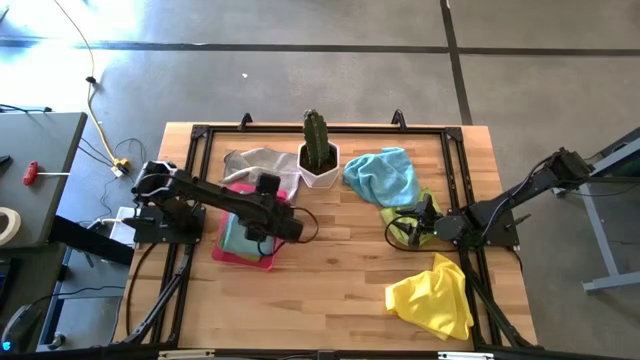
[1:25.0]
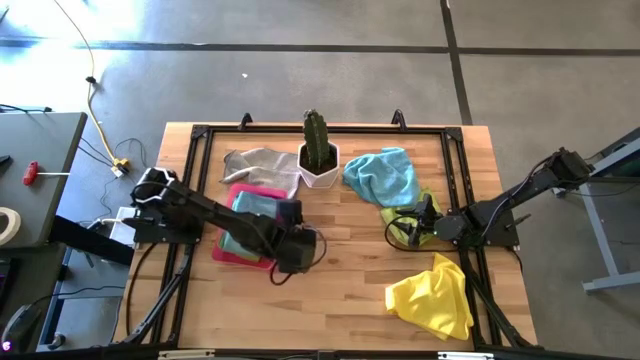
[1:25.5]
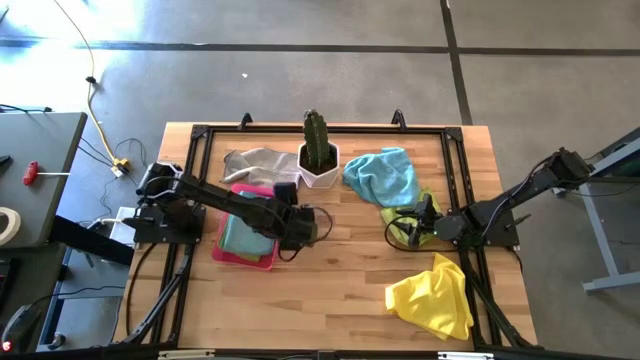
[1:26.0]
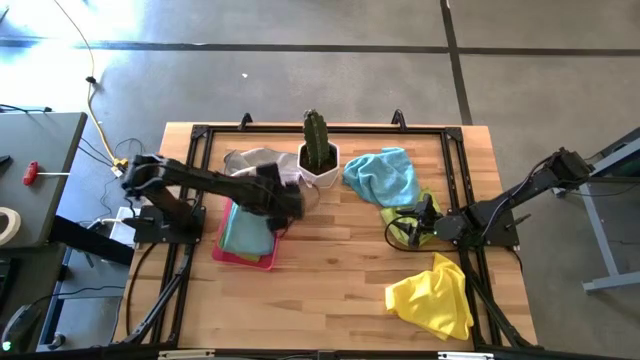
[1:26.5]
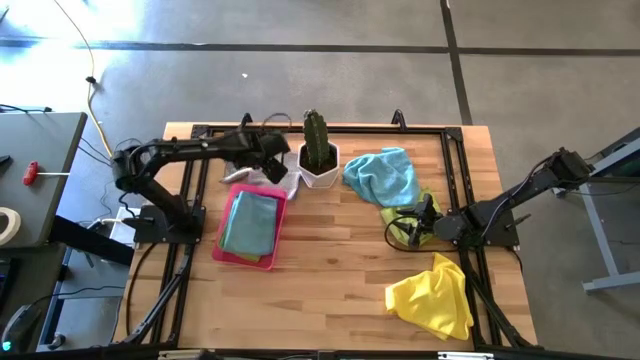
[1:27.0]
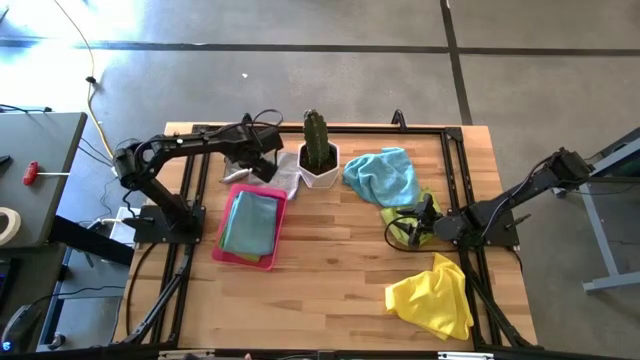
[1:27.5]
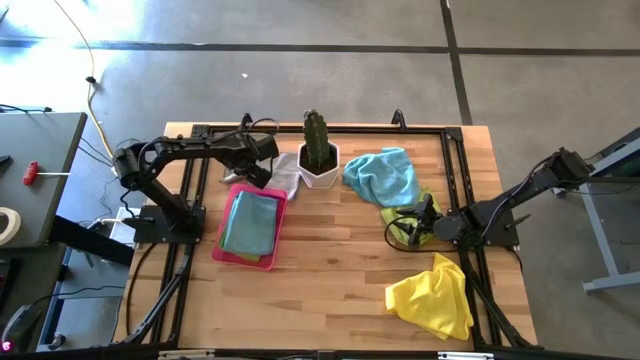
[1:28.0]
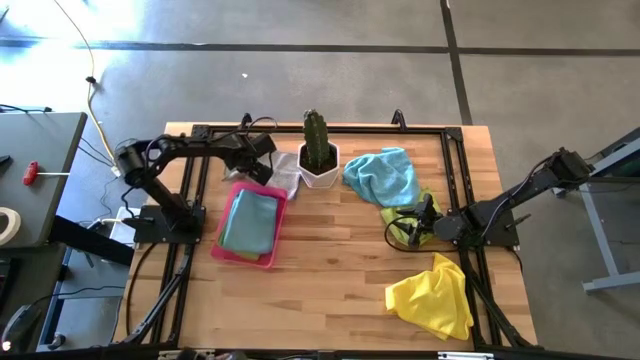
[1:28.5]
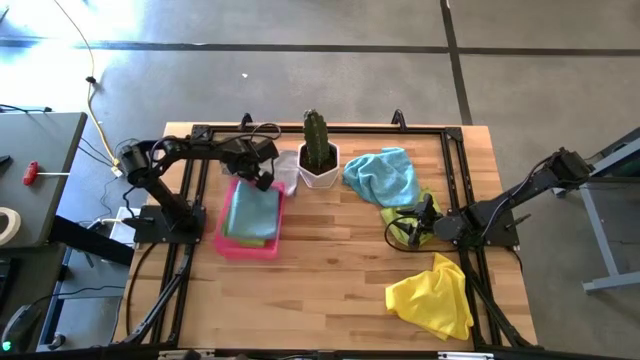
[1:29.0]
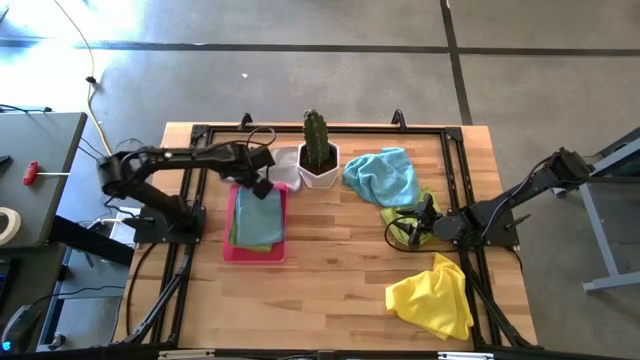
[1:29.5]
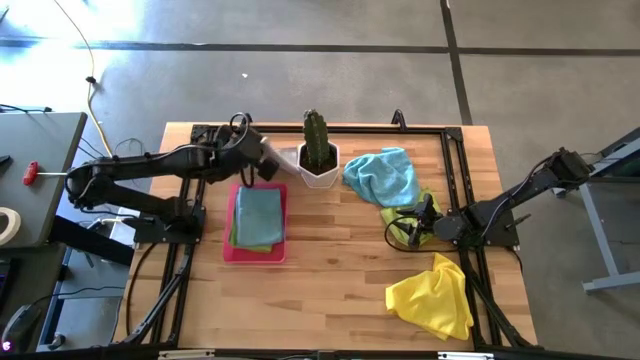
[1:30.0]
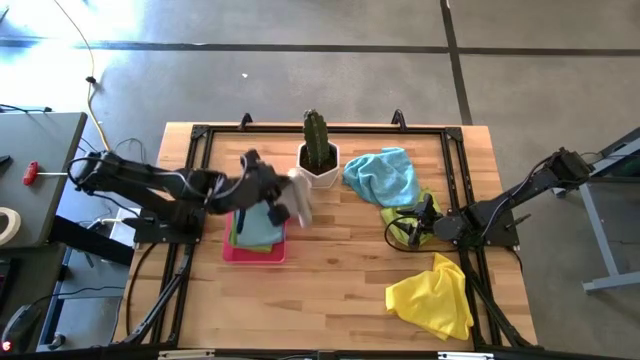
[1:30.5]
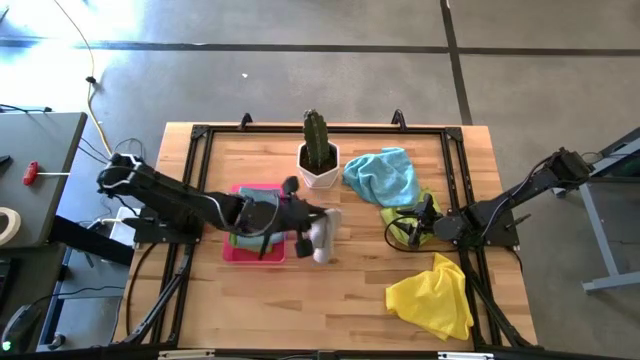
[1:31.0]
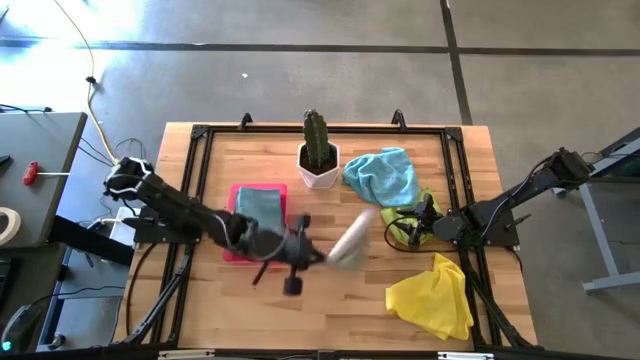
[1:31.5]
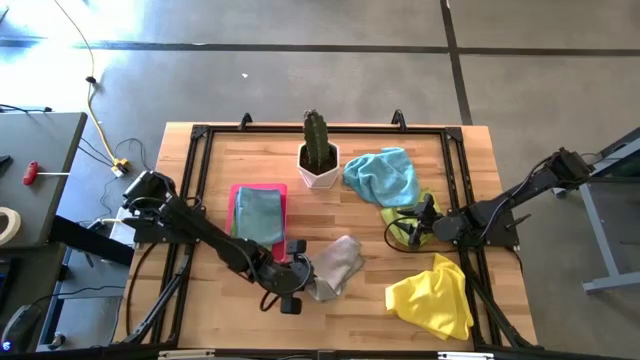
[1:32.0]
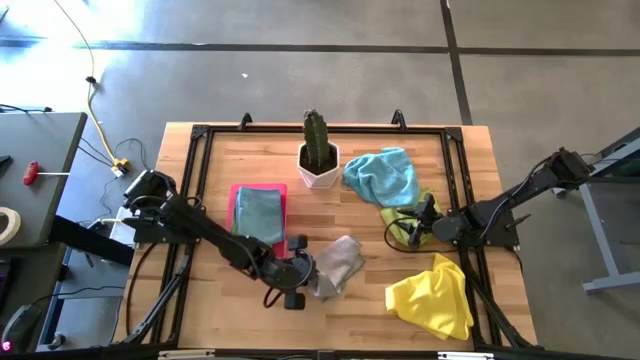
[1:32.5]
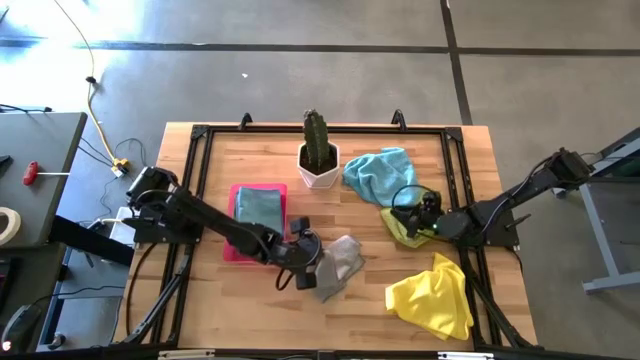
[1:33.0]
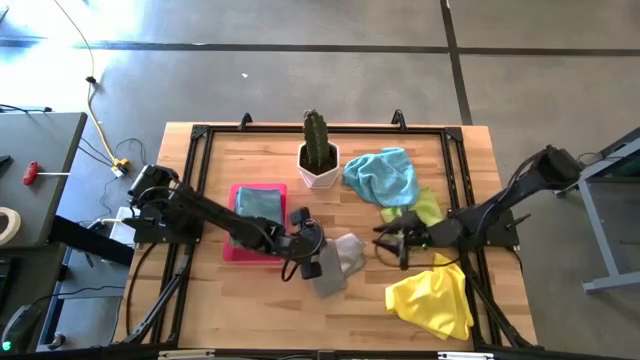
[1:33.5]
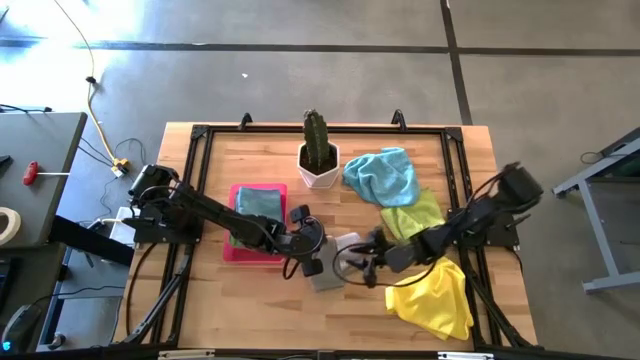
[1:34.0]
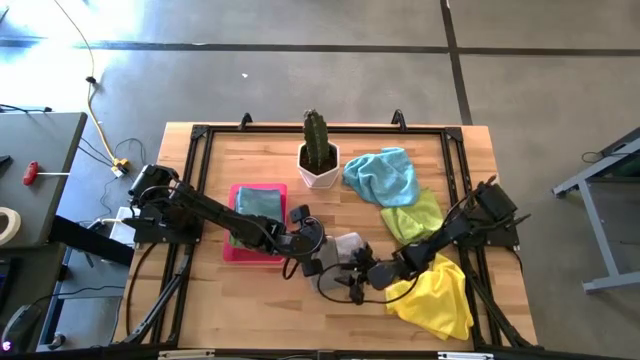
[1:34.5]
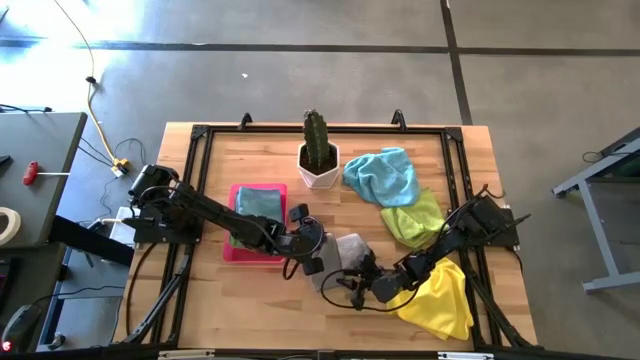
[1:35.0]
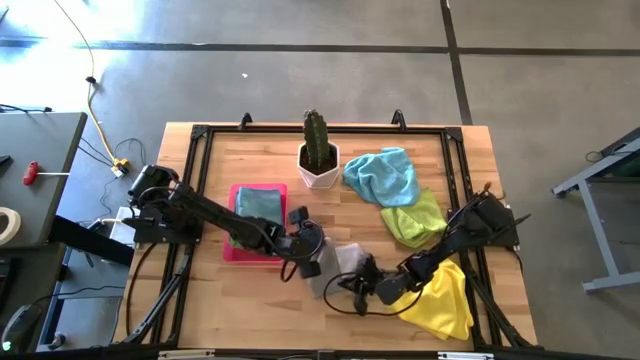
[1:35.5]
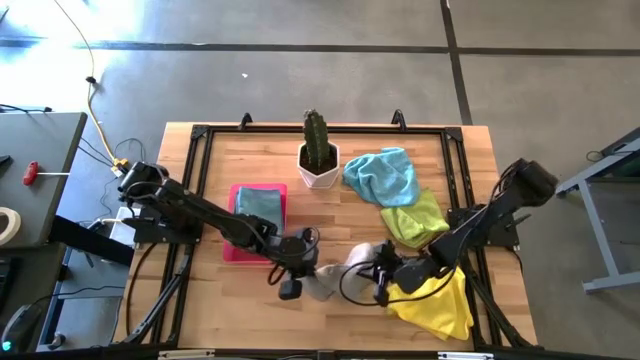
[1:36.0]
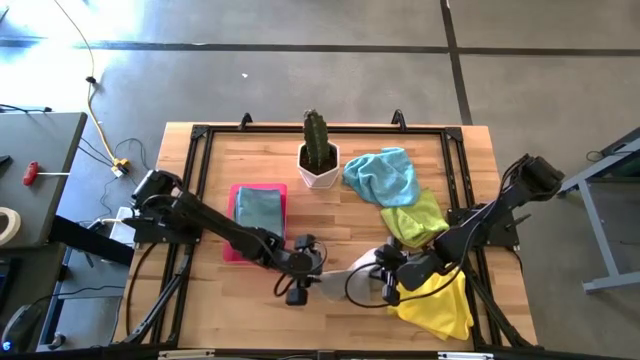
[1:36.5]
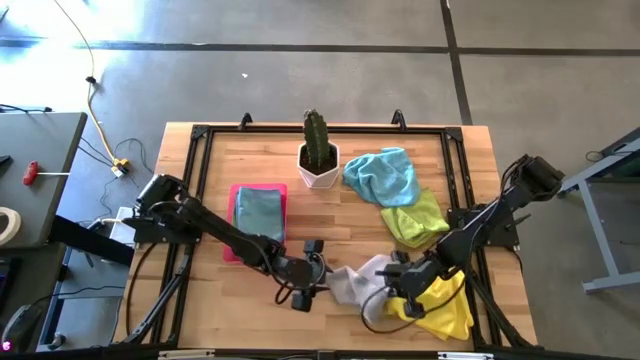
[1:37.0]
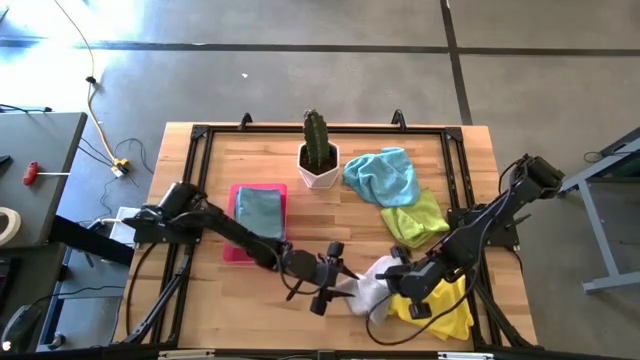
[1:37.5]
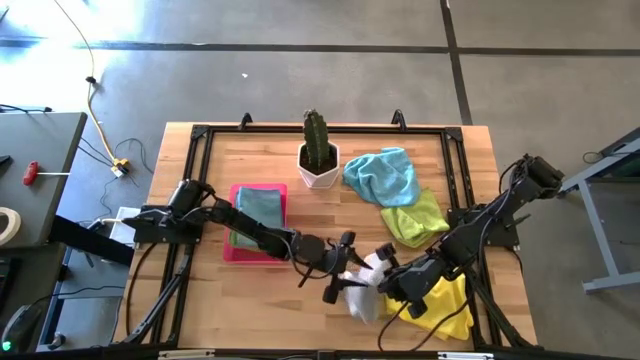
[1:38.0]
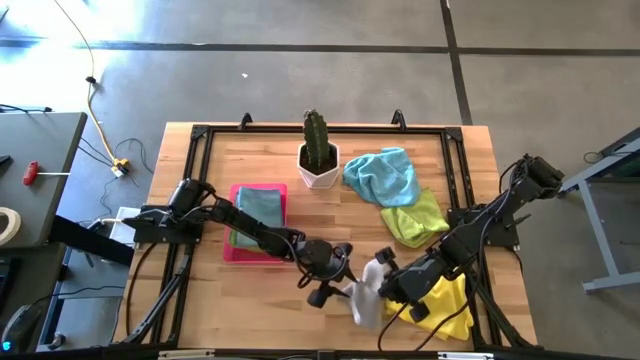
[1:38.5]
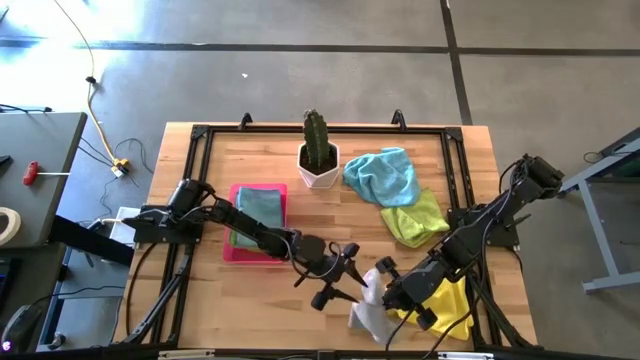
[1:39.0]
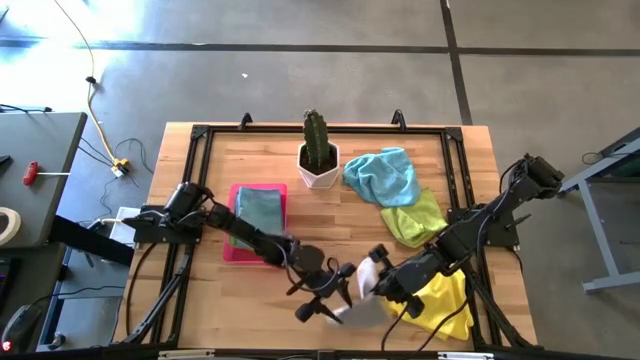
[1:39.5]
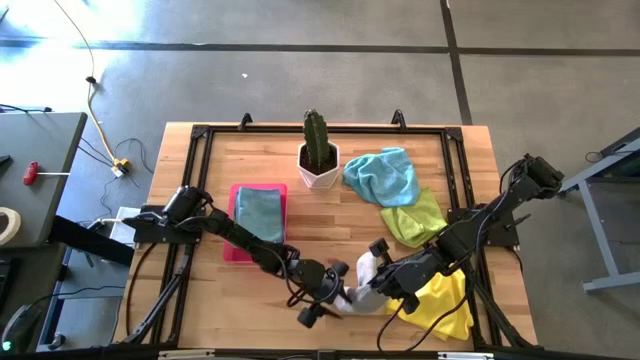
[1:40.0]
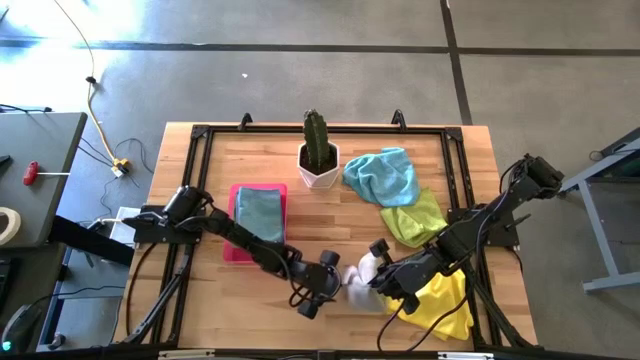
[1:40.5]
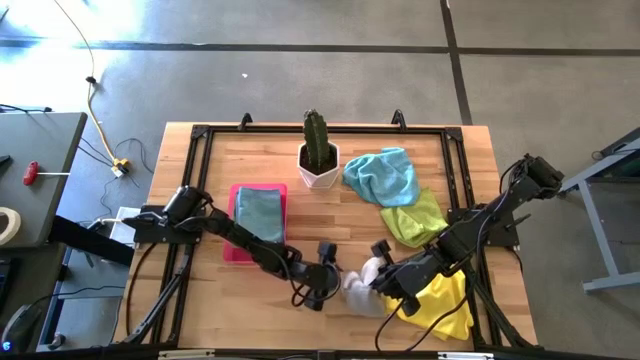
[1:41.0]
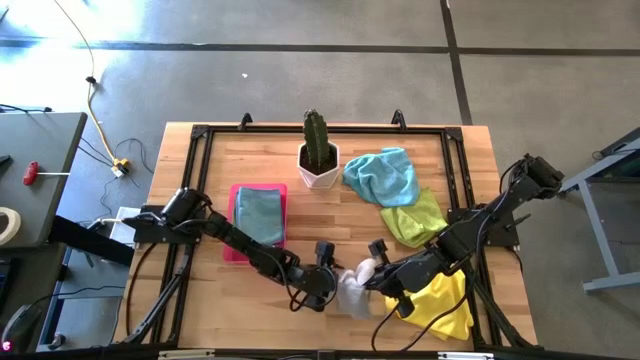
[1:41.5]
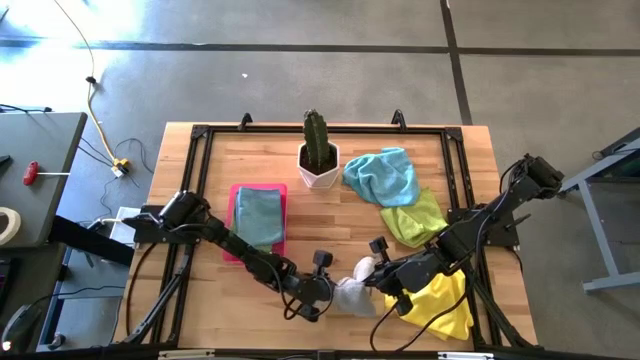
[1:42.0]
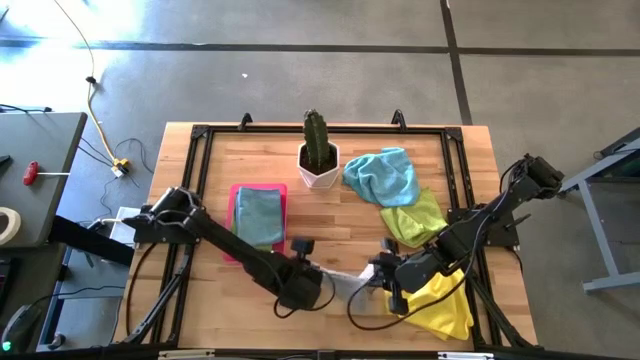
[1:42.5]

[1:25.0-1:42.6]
Task: Fold microfiber towels
Fold the gray towel

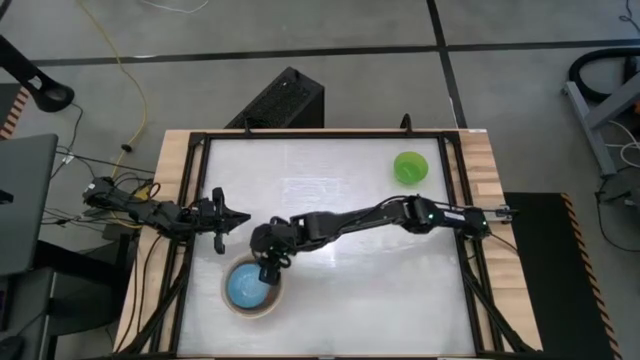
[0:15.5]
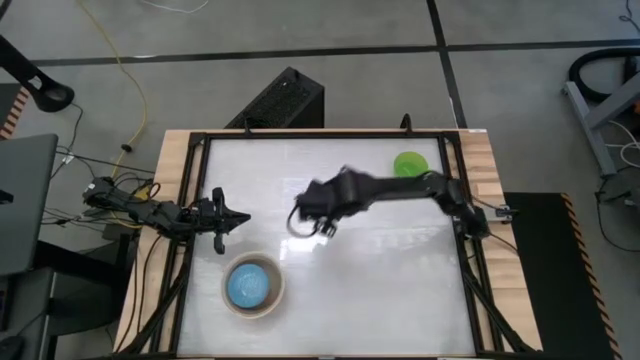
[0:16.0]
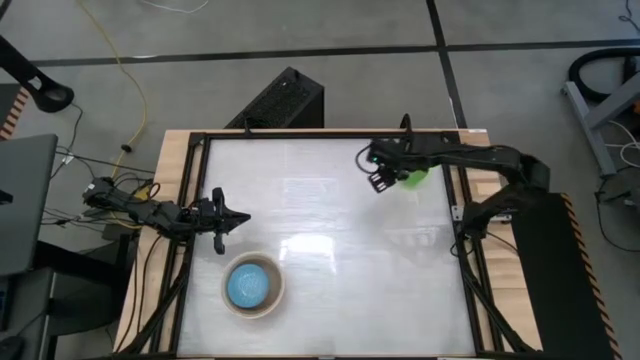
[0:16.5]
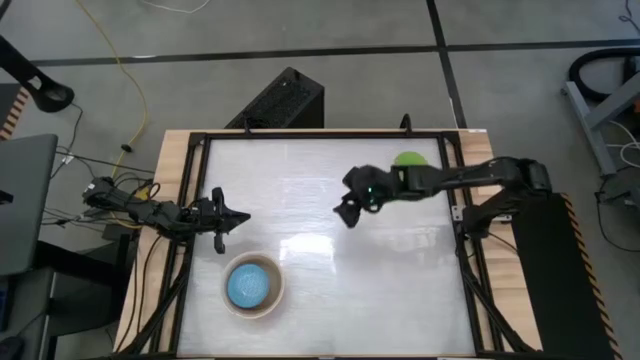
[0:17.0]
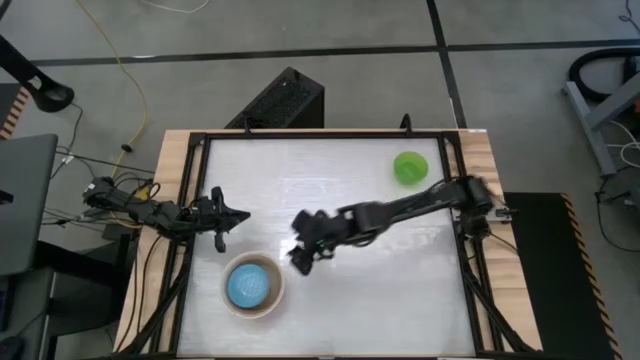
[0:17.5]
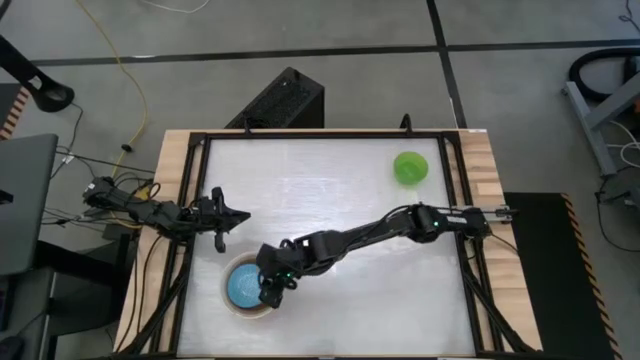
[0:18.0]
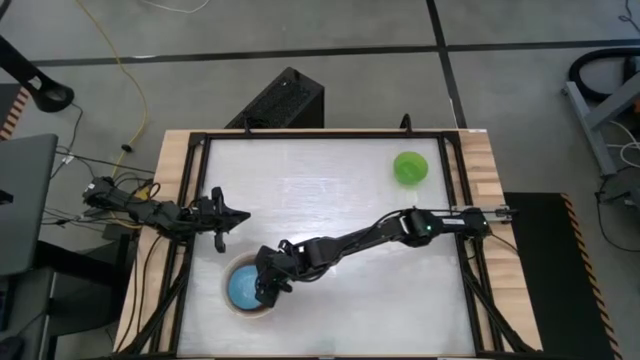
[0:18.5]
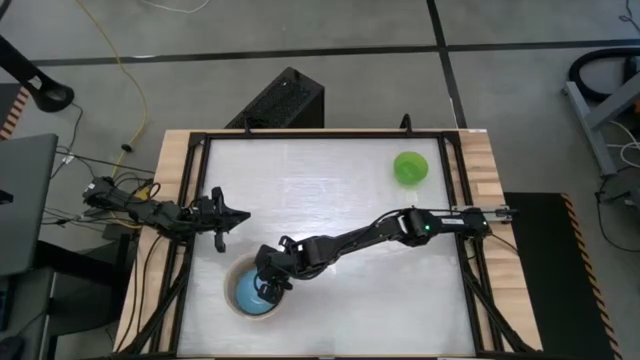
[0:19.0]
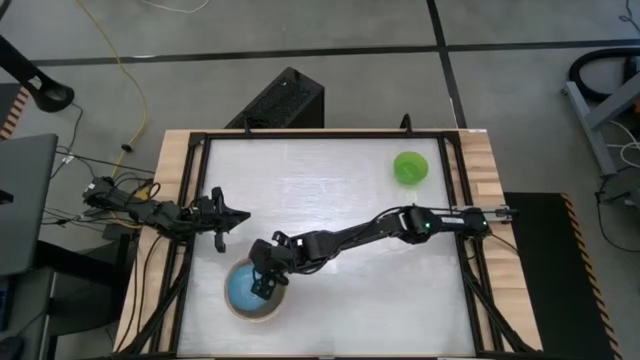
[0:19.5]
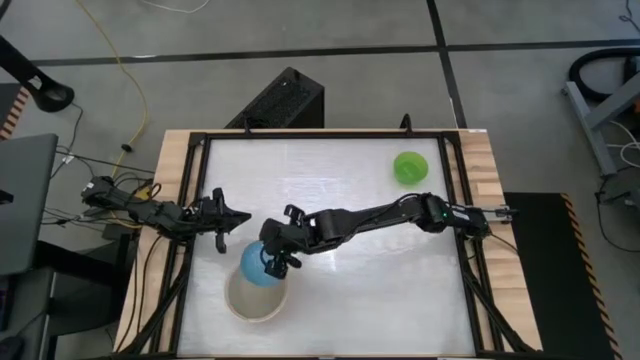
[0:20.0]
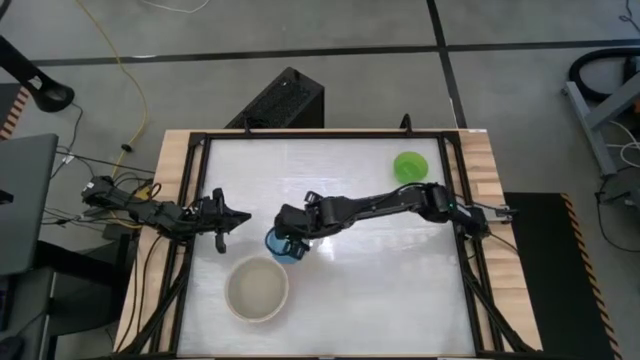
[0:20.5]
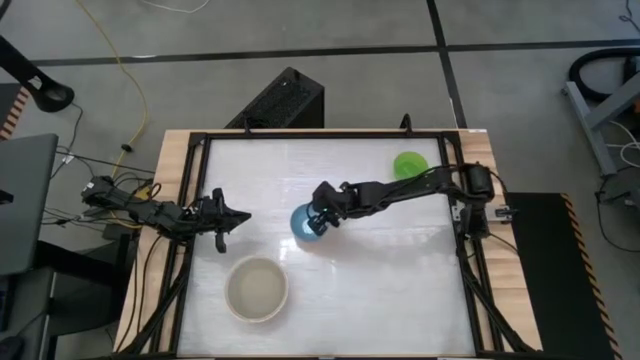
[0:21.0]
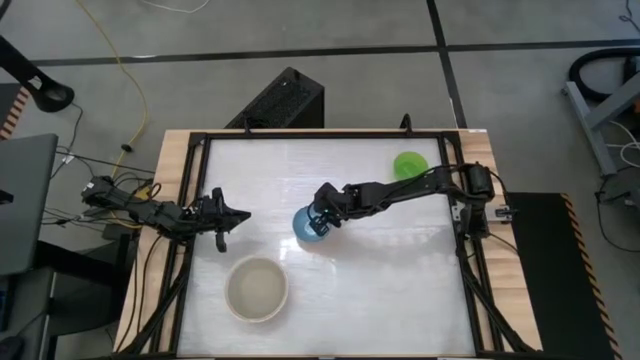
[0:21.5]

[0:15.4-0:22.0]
Task: Nest bowls inside each other by size order
Remove the blue bowl from the top of the gray bowl to the center of the table
